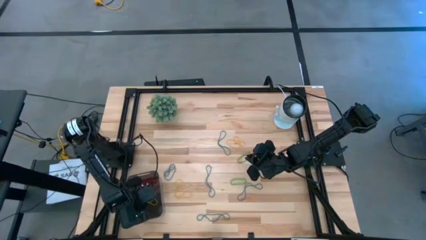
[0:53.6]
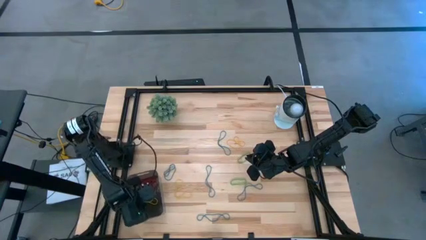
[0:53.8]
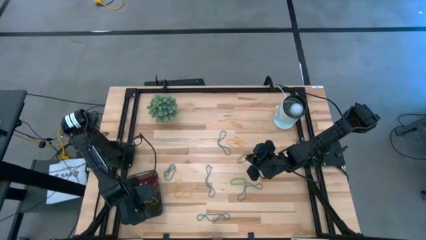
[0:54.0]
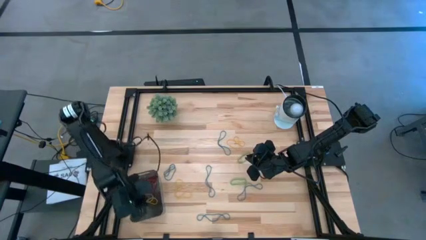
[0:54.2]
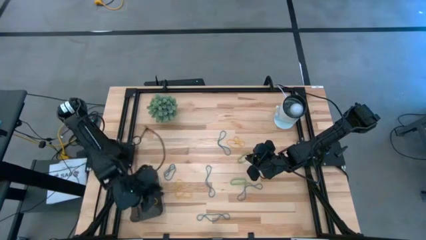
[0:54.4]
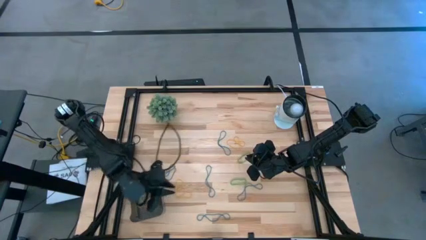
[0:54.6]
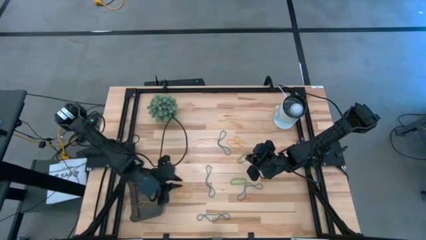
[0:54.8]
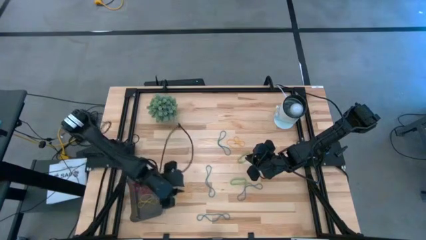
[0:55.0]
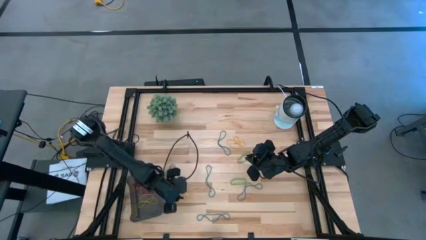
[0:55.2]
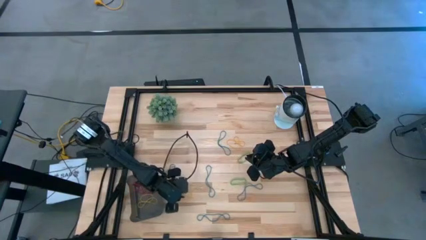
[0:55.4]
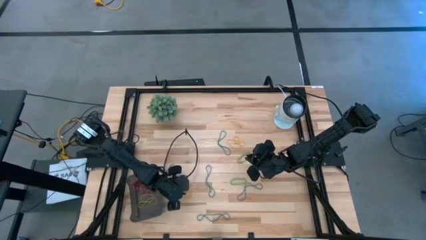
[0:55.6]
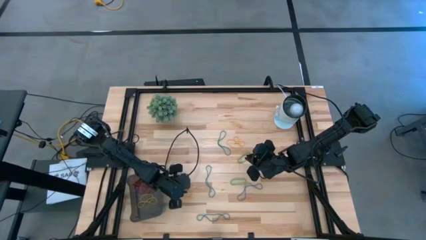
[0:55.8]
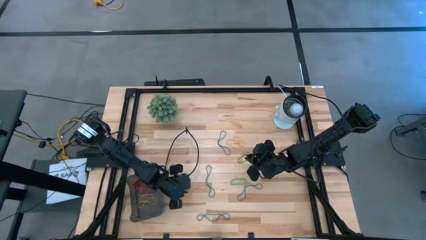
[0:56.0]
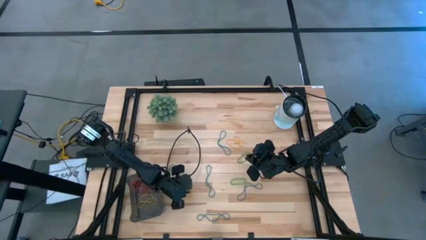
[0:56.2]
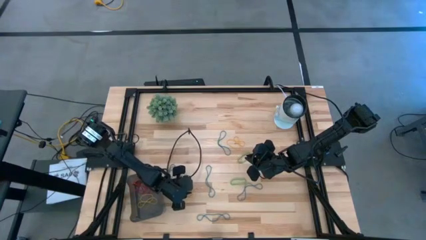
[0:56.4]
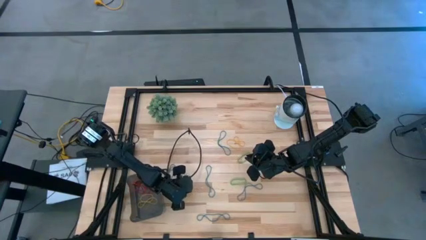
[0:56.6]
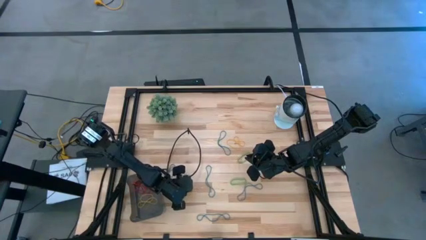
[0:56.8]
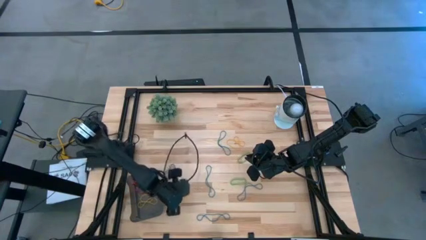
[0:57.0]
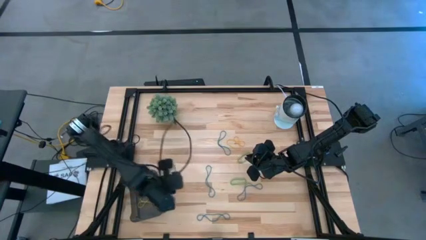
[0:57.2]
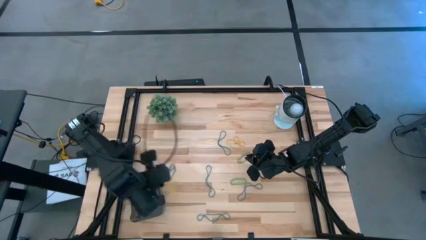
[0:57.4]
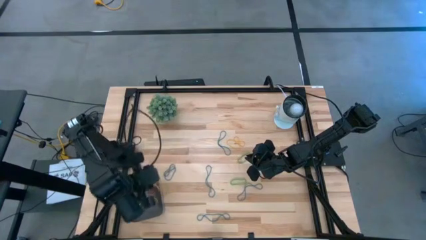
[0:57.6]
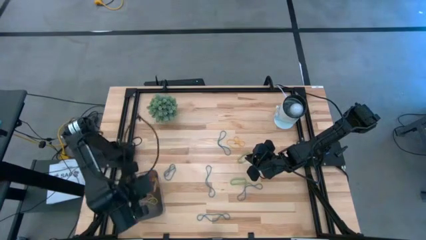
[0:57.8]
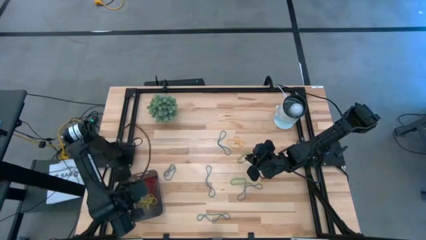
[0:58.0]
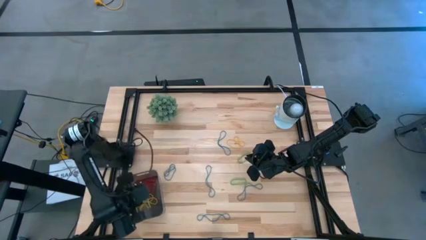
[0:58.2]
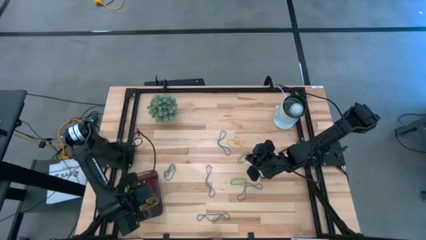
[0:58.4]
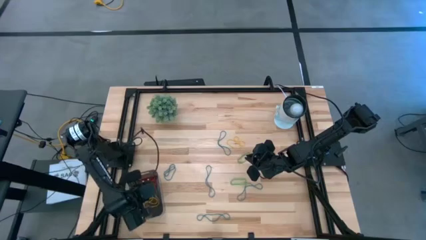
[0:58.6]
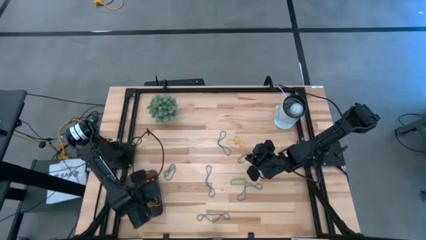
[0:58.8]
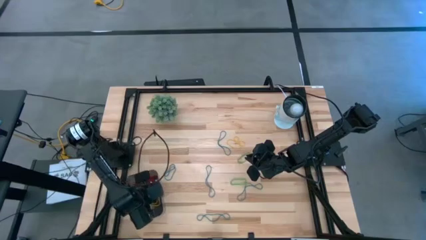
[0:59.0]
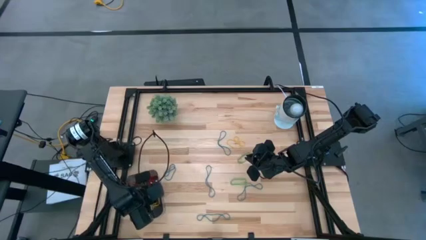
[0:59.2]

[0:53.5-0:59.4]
Task: Pick and place items into bin
Put the yellow rubber band into the black bin

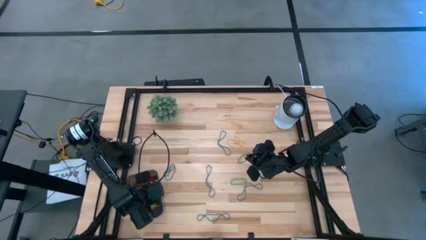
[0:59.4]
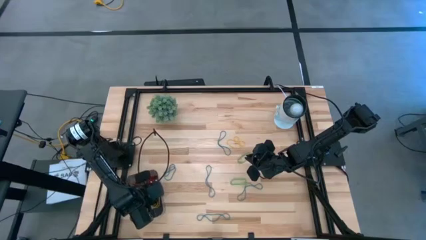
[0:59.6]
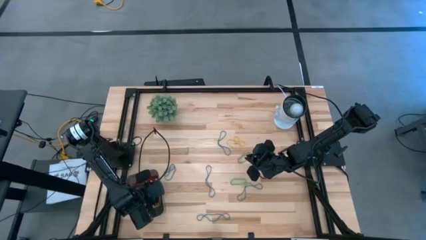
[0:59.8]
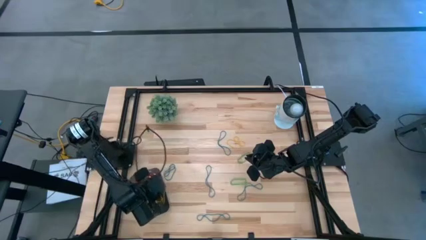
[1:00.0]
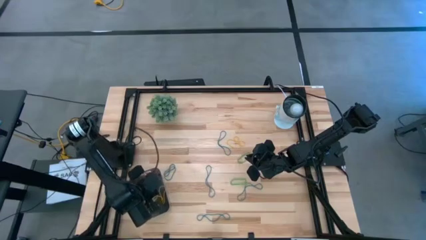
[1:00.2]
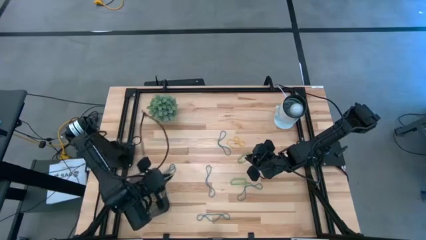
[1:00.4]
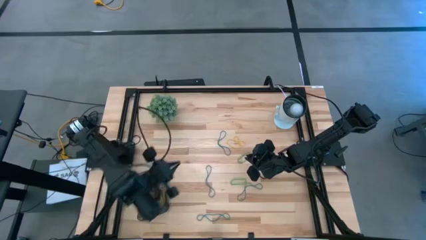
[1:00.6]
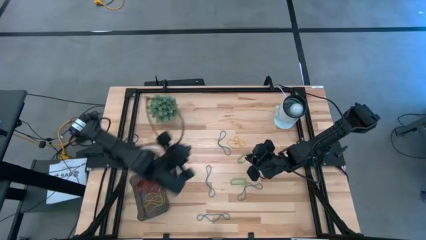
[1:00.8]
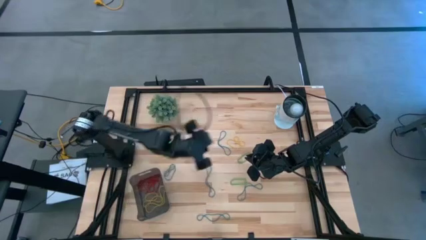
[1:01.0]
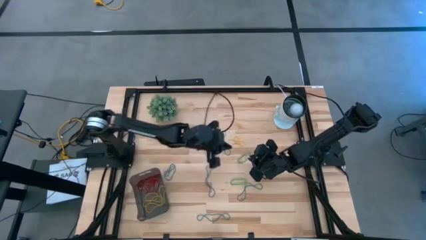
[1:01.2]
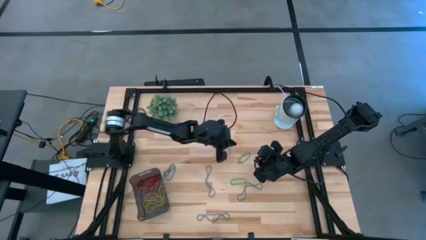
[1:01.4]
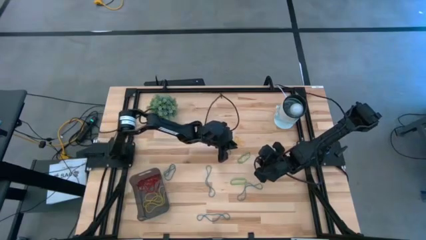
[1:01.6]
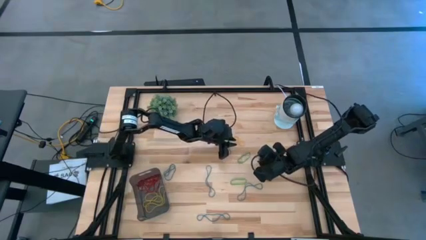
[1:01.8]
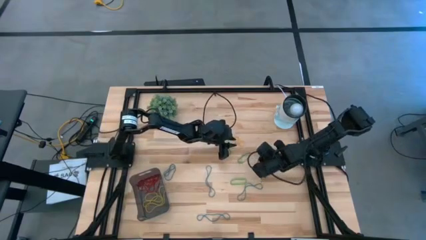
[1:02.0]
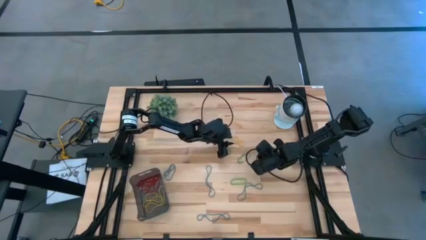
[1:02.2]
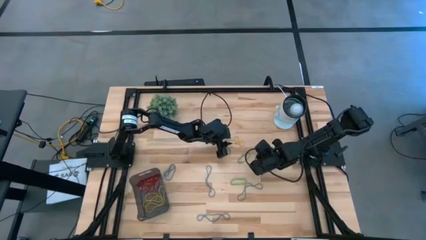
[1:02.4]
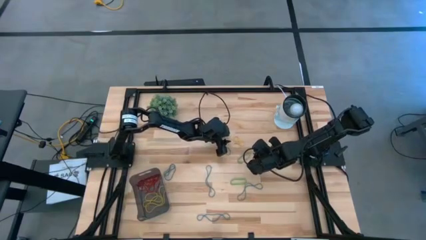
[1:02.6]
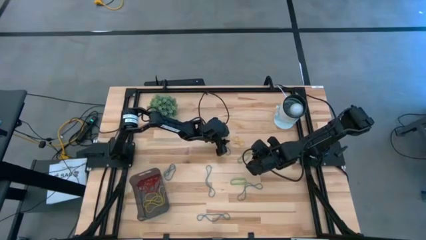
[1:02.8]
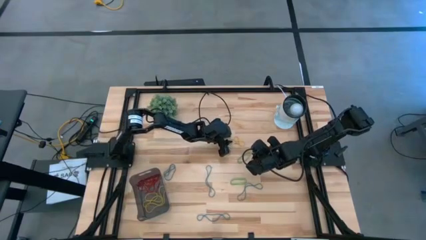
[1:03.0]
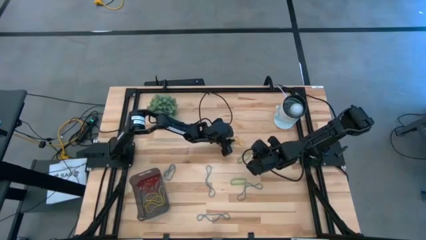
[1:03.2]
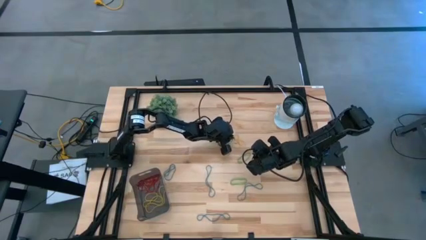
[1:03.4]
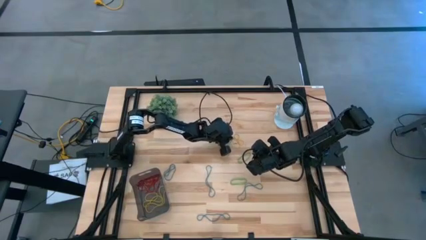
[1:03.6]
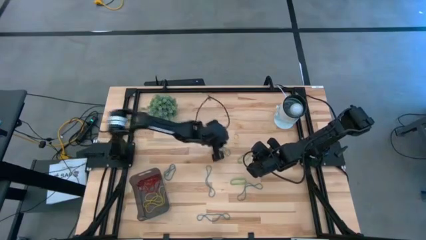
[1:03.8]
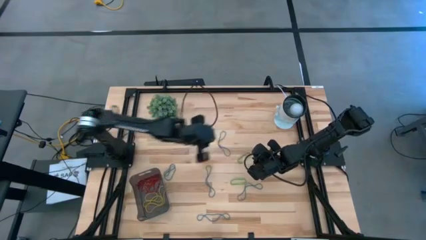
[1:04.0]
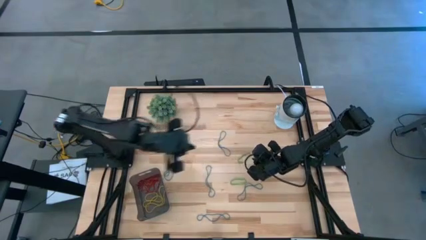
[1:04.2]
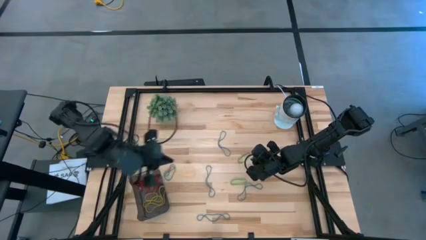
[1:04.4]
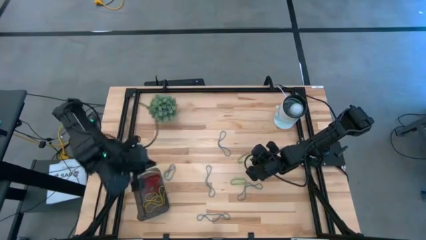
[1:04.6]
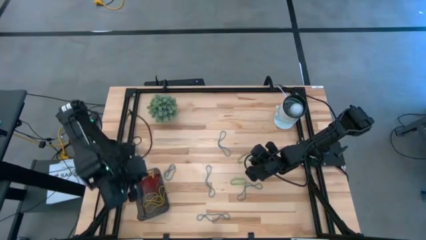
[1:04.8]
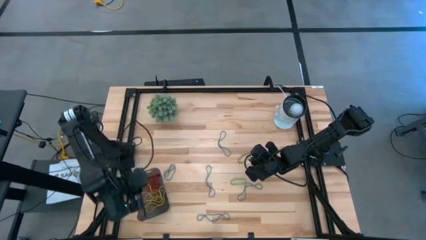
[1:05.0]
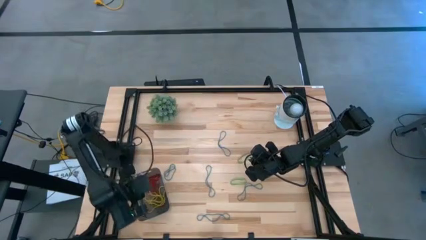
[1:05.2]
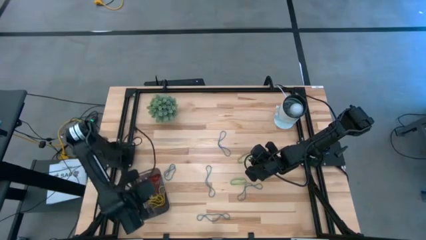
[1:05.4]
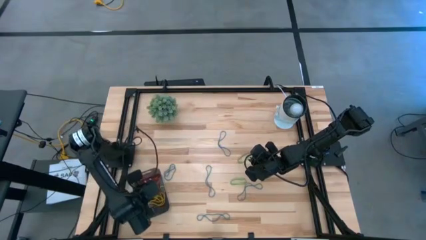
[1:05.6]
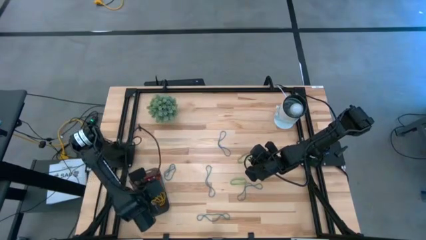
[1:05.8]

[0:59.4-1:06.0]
Put the yellow rubber band into the black bin
